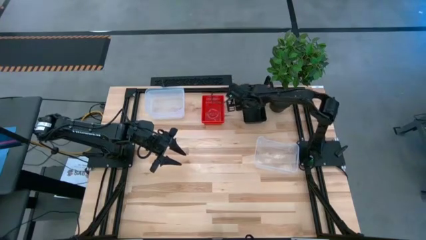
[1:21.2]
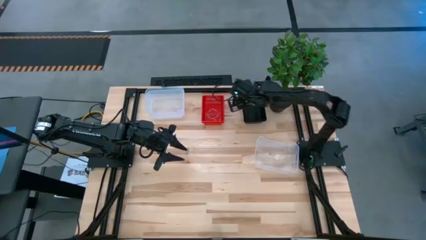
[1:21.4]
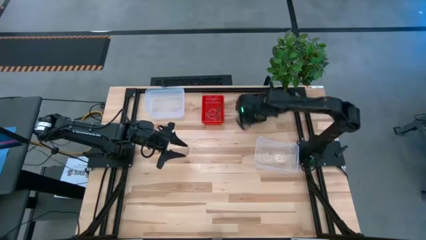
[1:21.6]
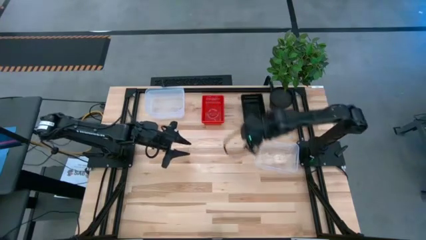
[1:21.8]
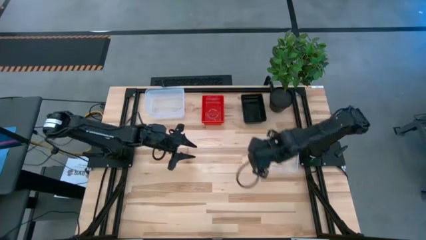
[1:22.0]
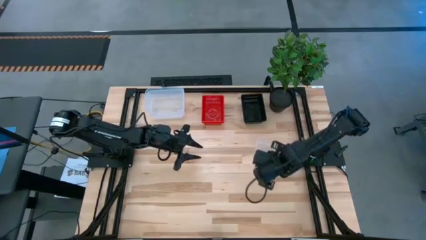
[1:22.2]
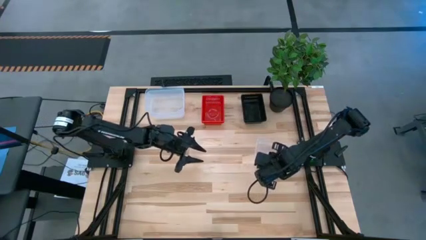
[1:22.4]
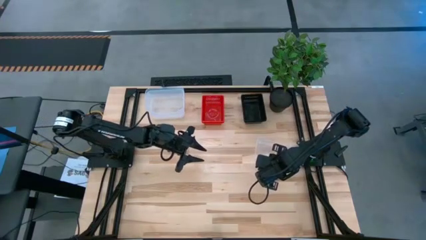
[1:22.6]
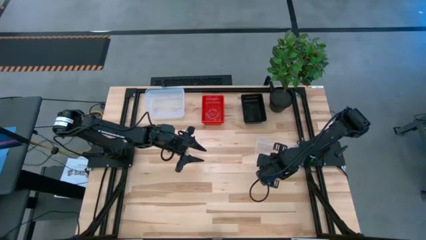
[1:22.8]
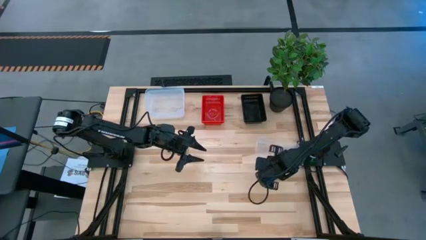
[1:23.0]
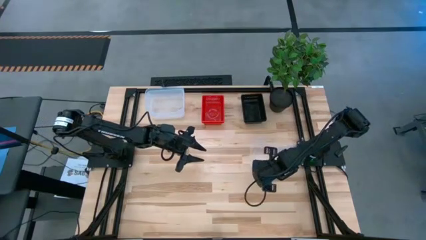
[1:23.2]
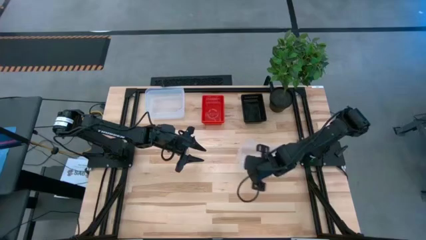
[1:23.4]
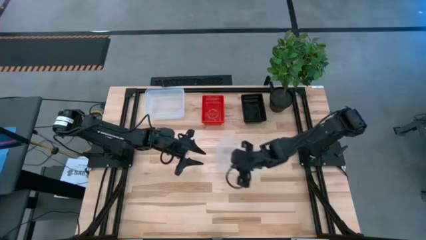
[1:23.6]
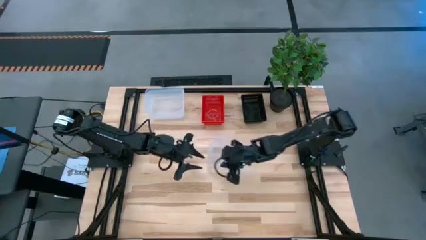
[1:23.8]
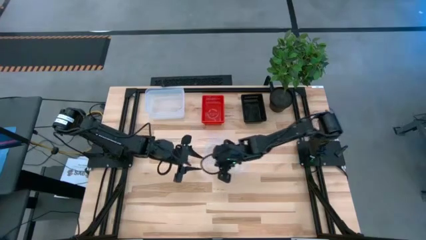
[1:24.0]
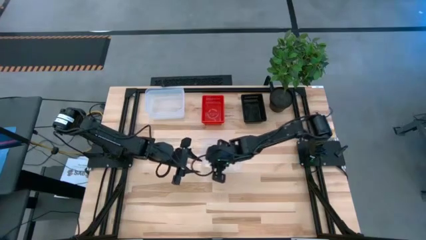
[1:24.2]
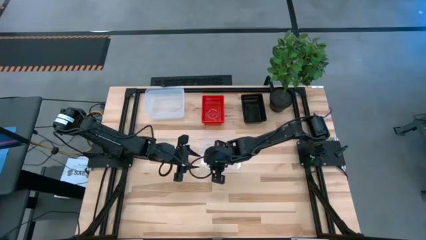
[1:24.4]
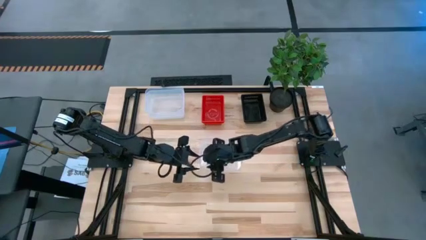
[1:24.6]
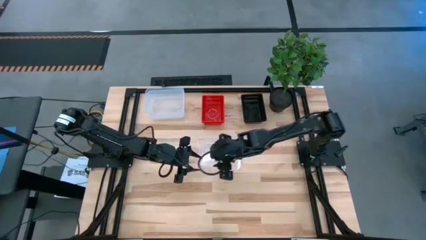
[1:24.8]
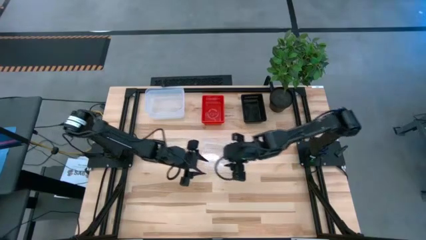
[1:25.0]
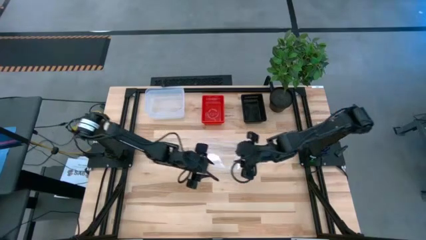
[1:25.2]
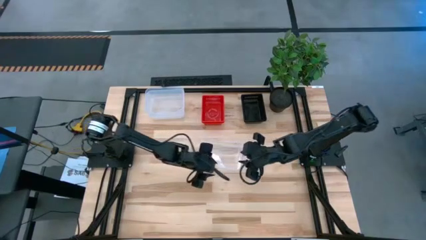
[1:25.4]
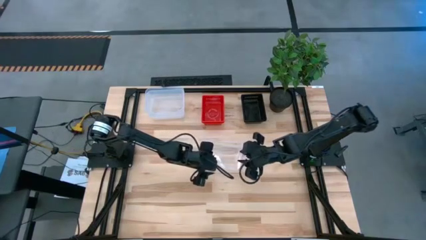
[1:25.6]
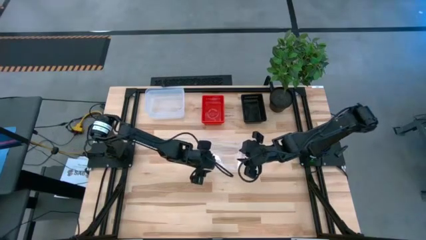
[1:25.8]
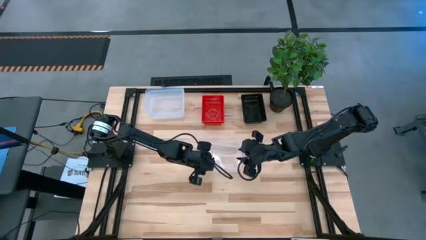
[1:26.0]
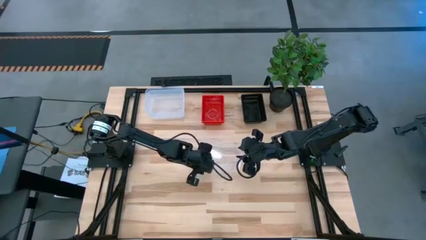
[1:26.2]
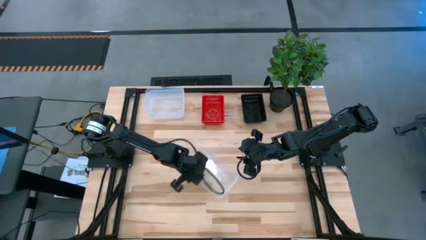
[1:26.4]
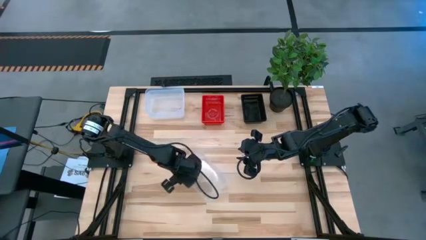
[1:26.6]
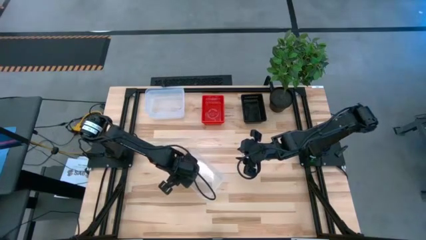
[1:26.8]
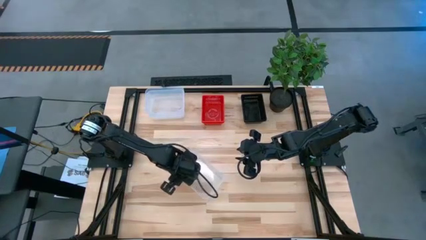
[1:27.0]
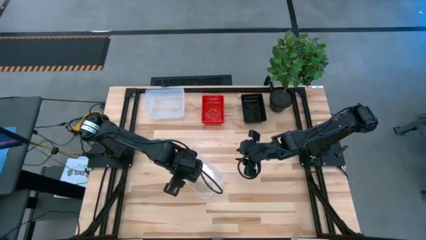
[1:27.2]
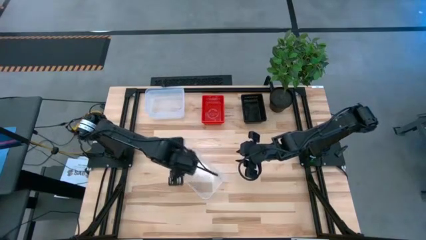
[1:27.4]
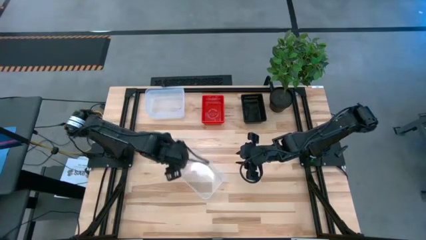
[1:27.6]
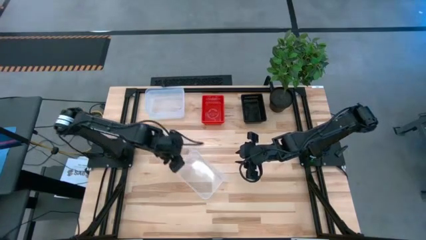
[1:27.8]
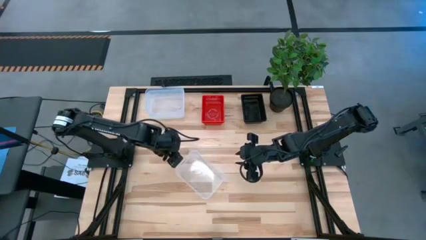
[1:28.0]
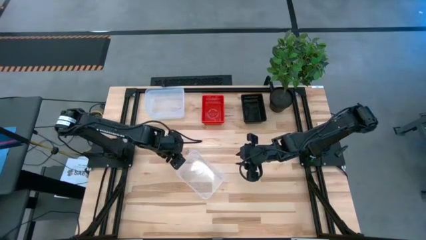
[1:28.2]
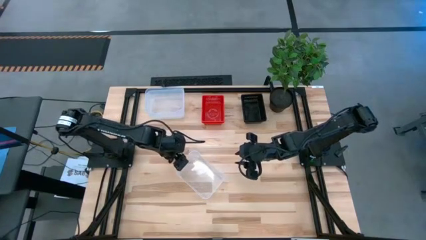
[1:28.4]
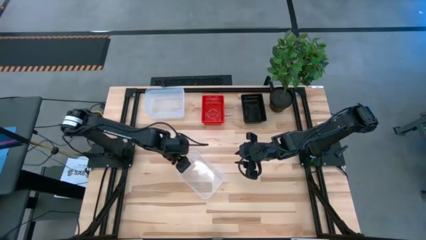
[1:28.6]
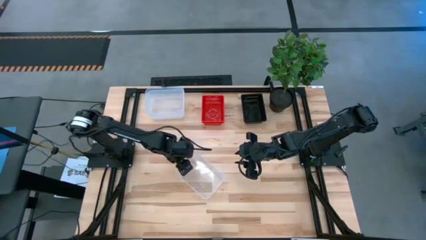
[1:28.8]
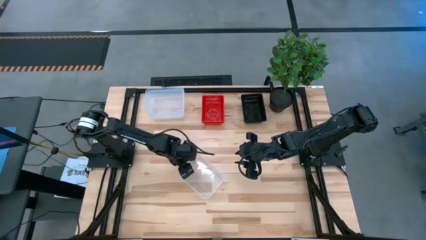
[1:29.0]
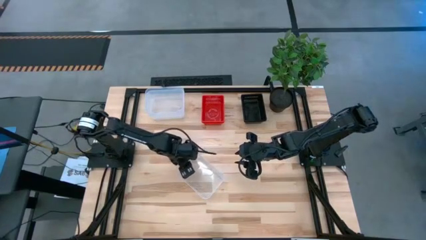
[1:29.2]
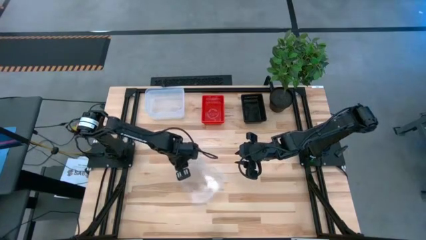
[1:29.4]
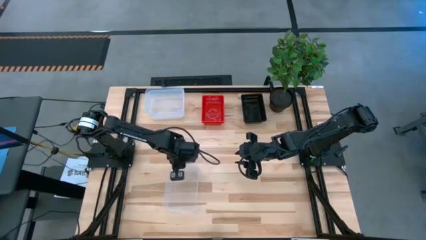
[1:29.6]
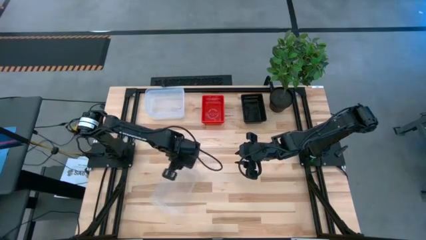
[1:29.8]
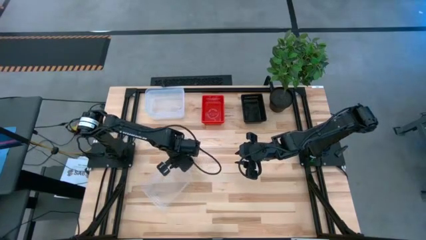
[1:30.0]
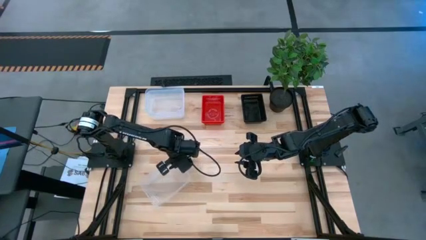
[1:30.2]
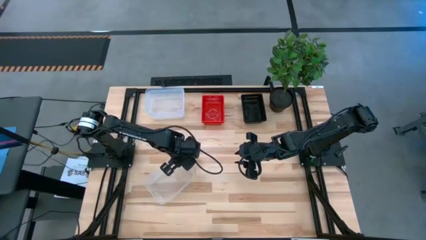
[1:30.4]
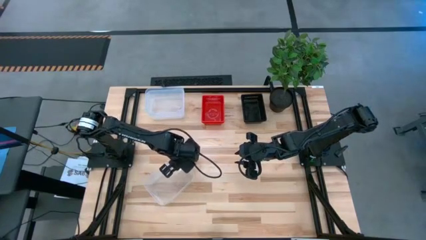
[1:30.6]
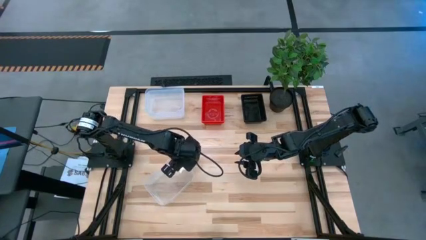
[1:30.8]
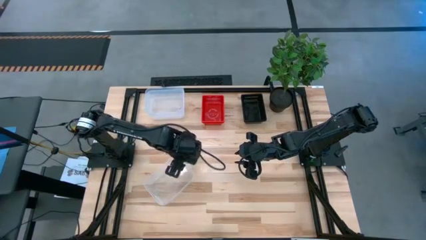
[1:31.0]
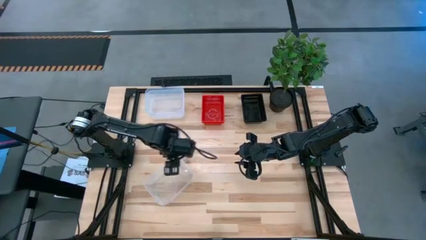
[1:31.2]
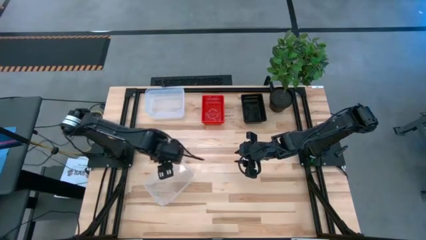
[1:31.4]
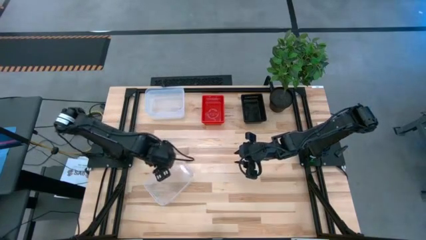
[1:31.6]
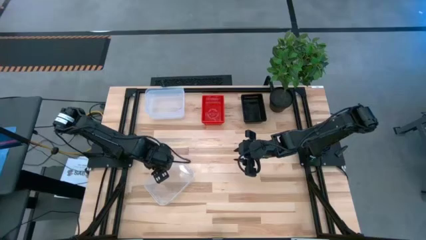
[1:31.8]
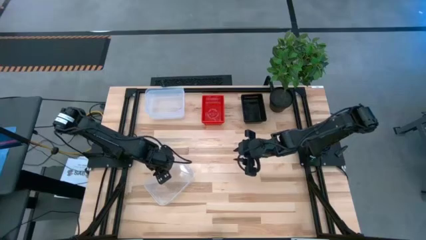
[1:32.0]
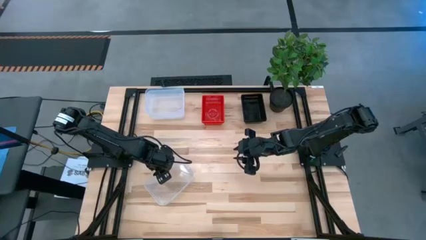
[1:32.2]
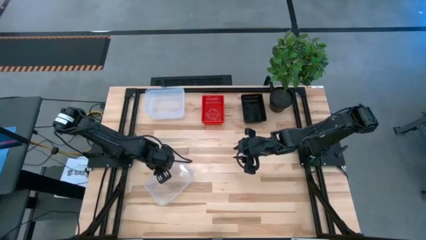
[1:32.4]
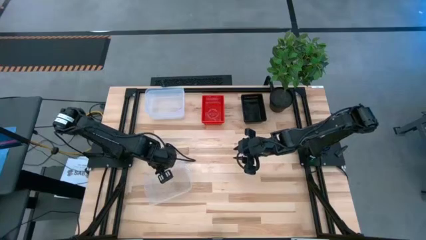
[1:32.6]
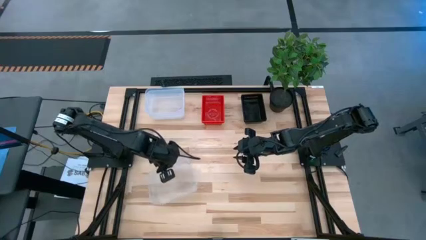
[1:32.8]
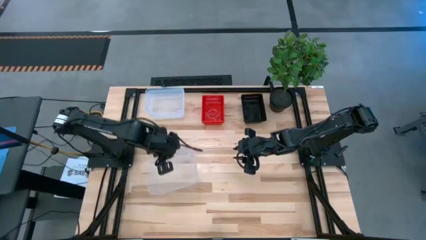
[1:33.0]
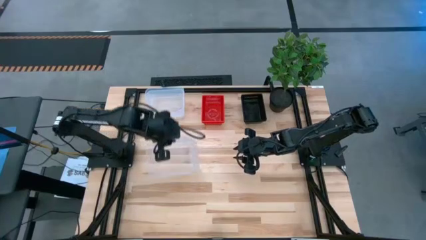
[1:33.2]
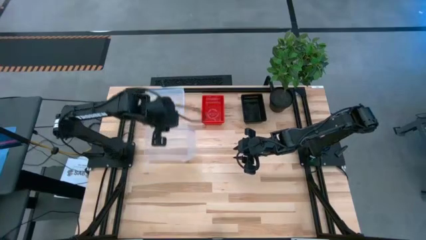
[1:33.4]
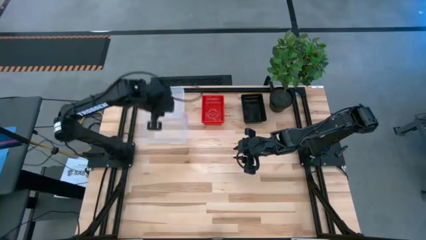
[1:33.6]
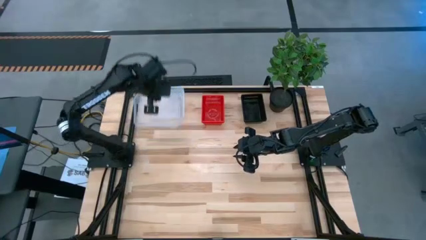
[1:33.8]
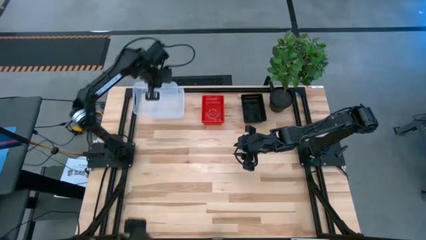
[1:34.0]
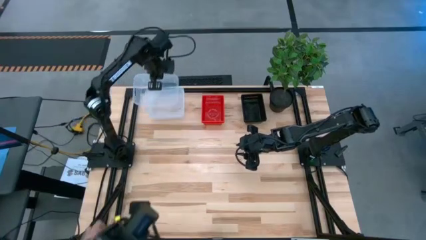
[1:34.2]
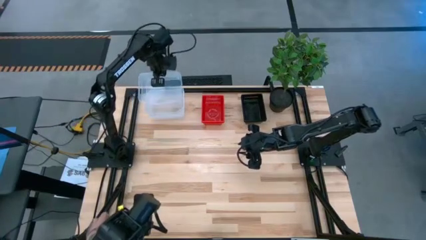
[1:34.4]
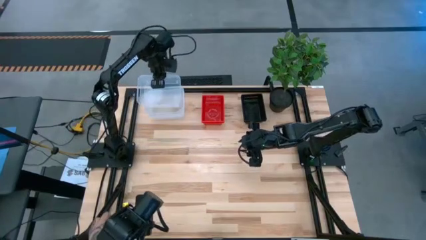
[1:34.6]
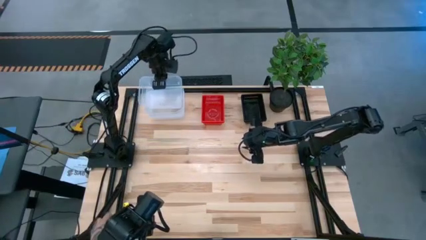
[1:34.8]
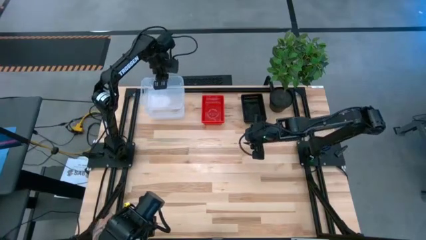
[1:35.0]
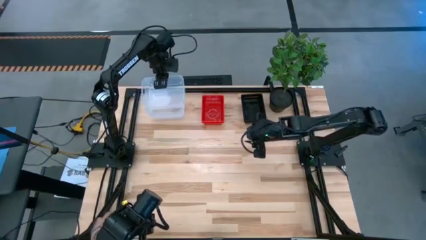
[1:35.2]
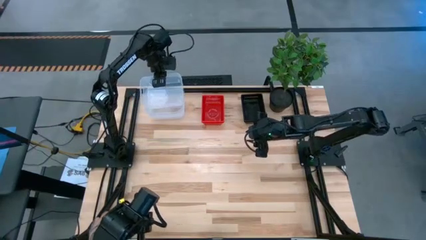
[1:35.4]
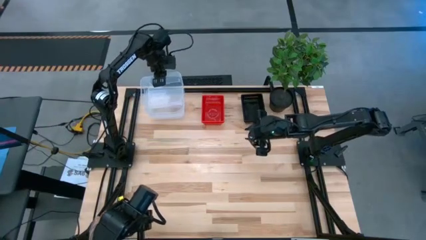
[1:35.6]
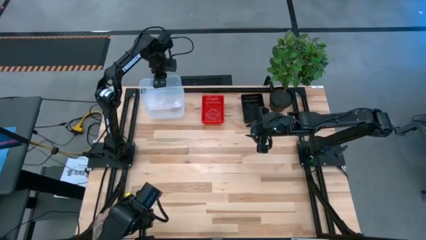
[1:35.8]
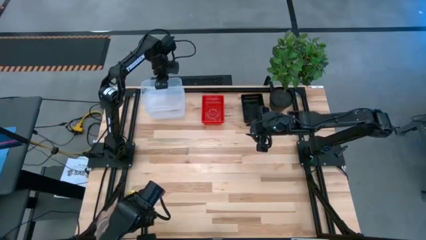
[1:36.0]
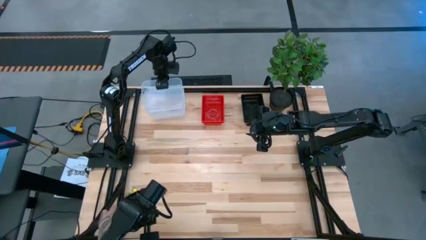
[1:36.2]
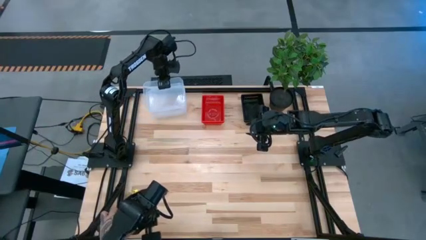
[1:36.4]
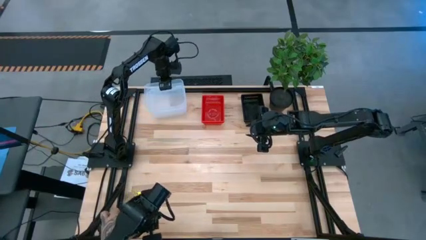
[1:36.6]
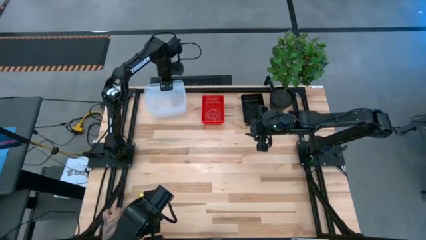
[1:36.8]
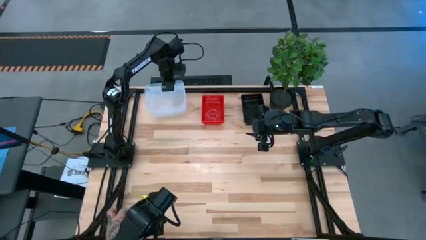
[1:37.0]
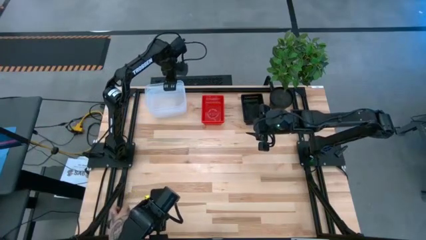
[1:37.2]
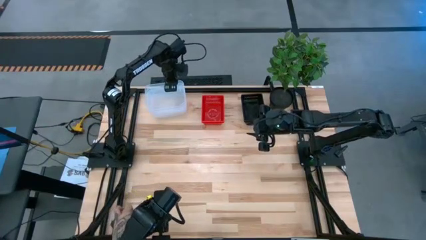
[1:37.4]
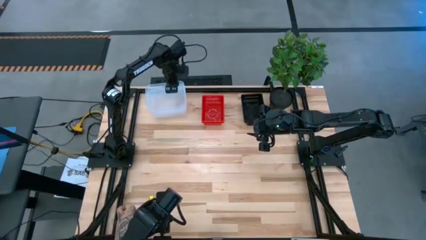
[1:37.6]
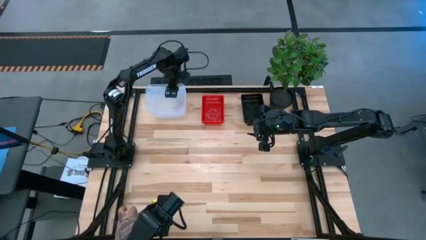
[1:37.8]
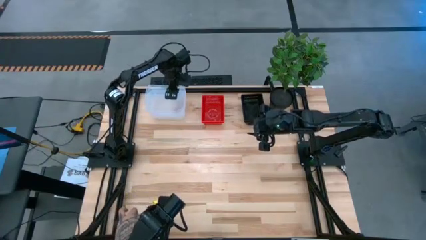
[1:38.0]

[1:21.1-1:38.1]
Stack the right transparent bin on the top transparent bin
